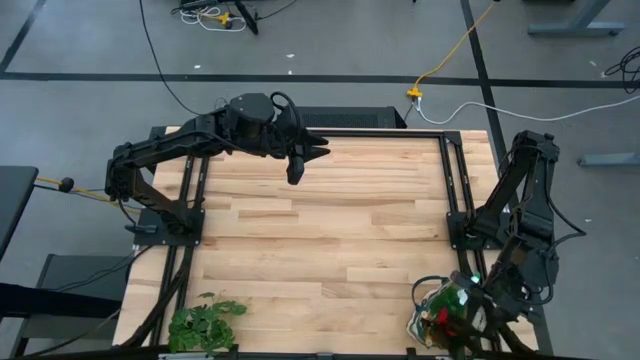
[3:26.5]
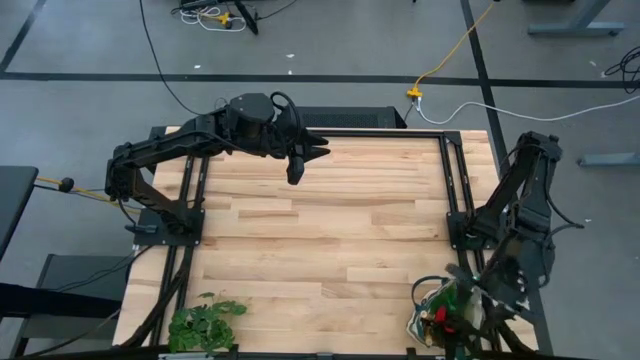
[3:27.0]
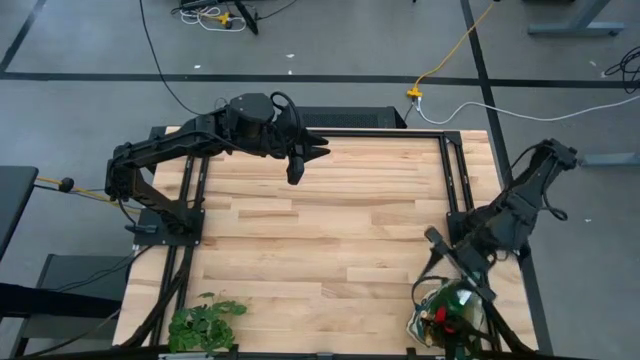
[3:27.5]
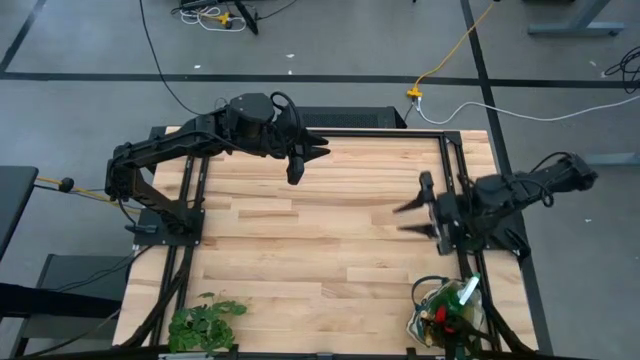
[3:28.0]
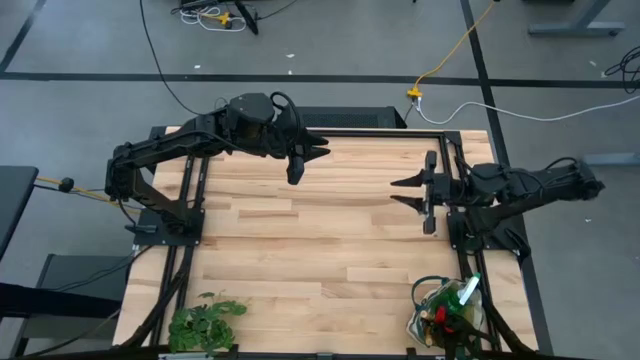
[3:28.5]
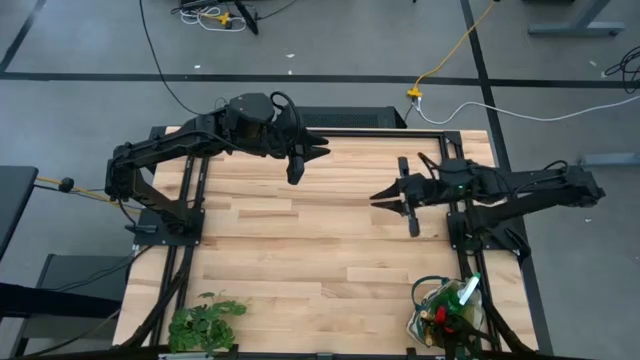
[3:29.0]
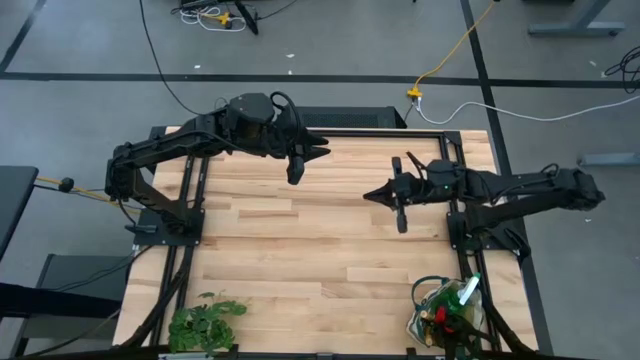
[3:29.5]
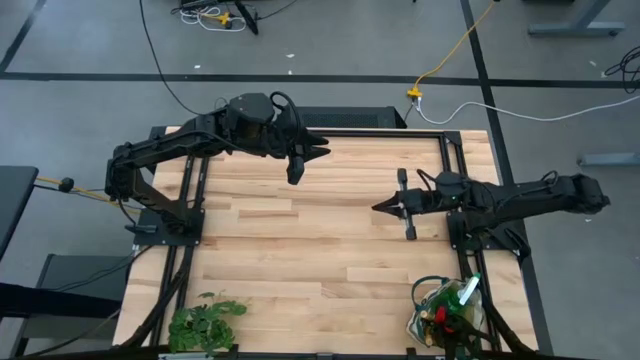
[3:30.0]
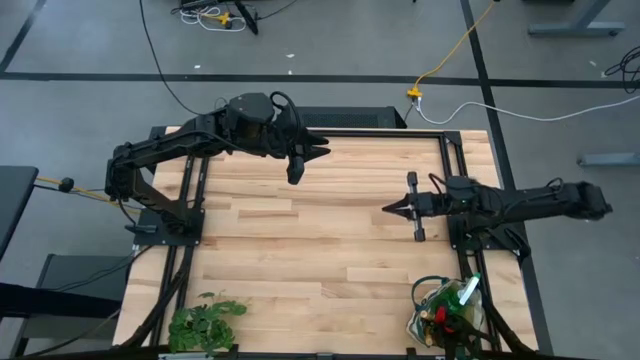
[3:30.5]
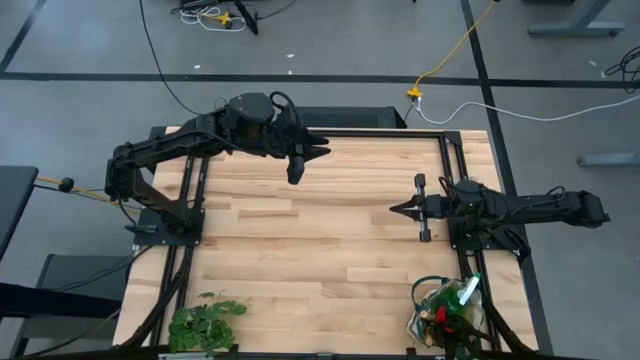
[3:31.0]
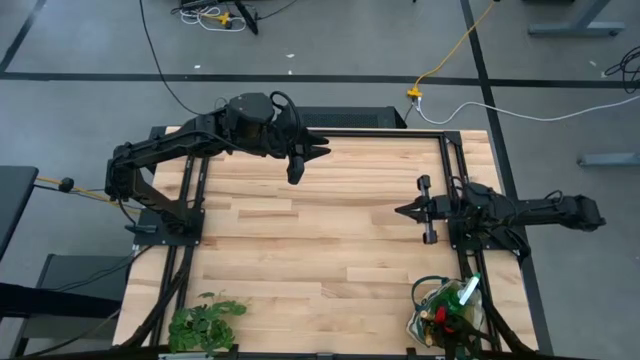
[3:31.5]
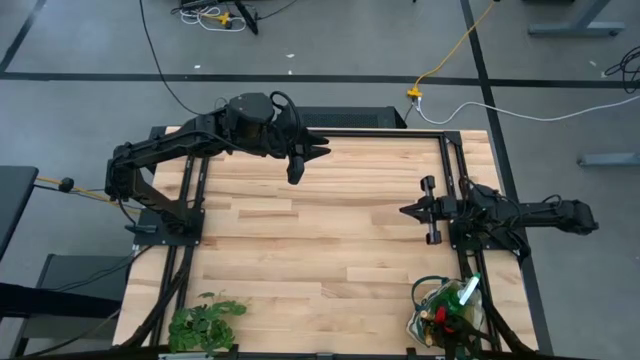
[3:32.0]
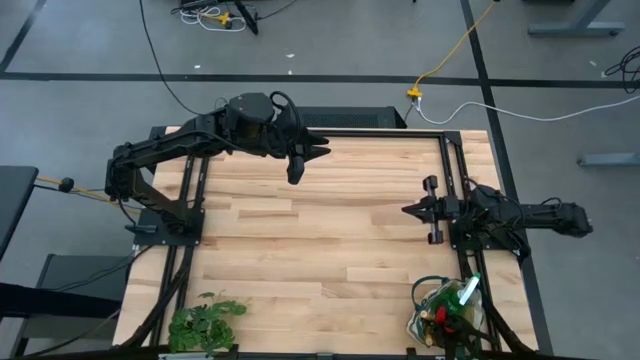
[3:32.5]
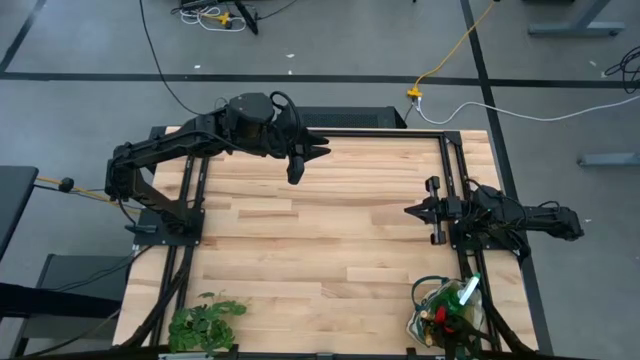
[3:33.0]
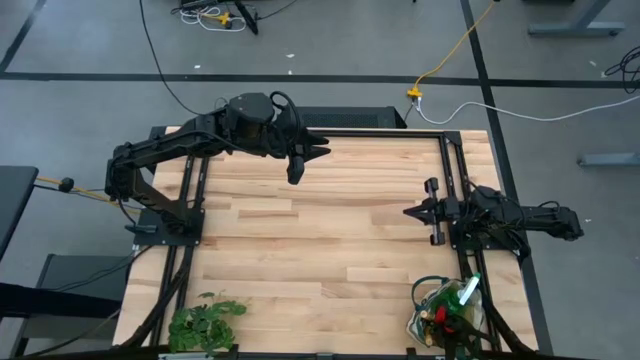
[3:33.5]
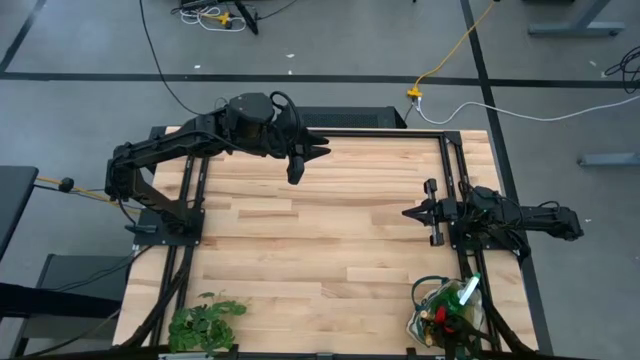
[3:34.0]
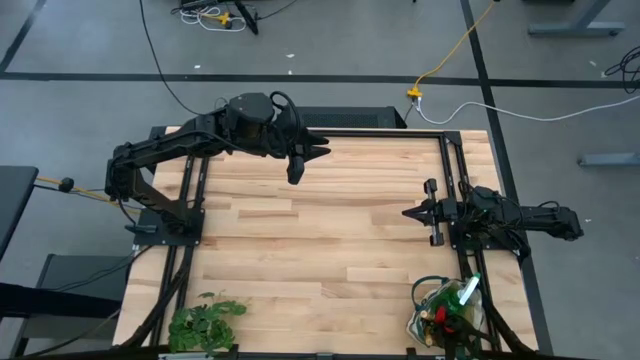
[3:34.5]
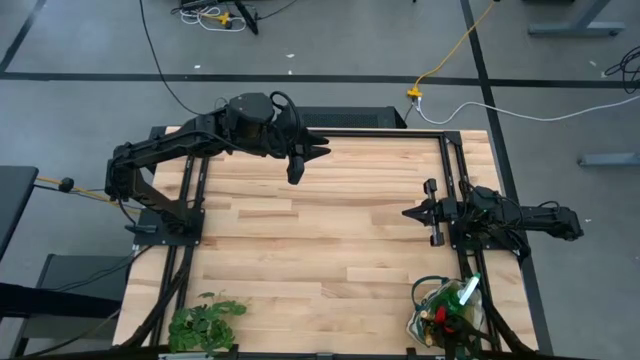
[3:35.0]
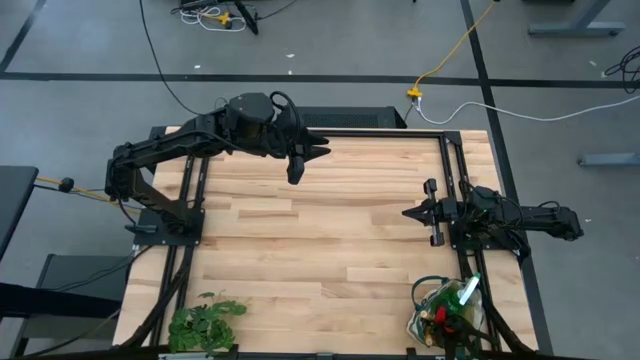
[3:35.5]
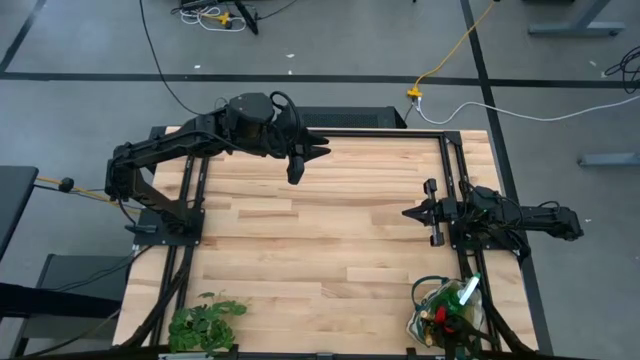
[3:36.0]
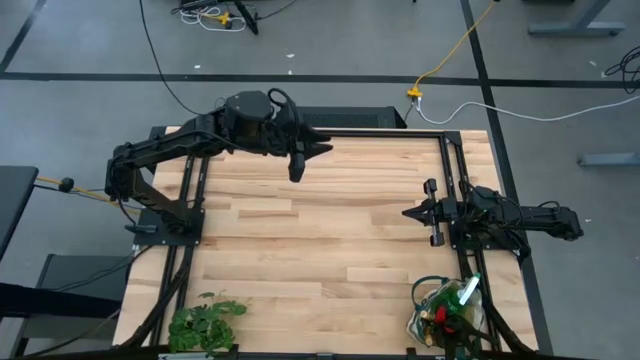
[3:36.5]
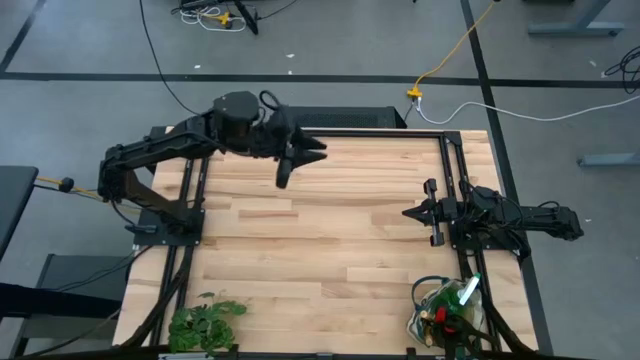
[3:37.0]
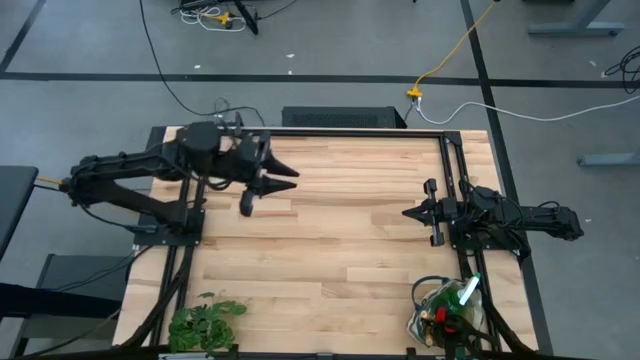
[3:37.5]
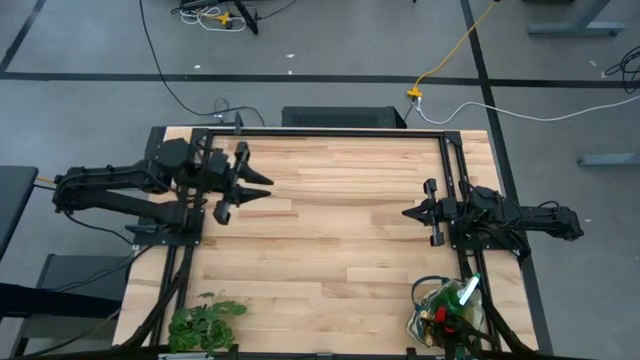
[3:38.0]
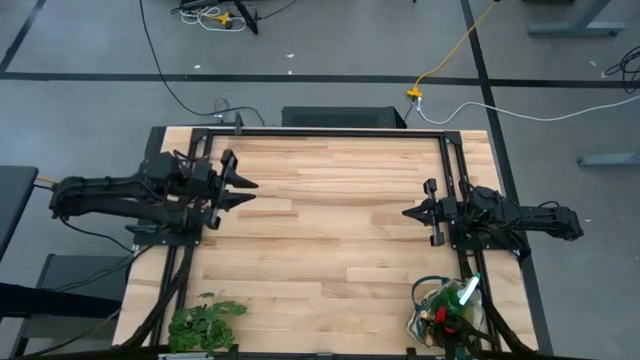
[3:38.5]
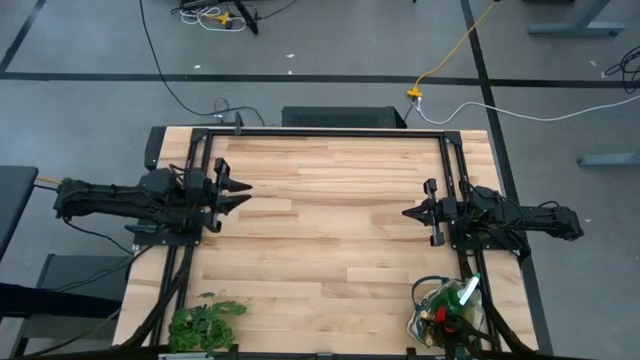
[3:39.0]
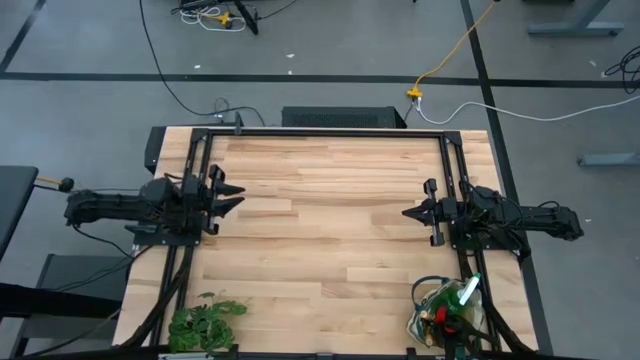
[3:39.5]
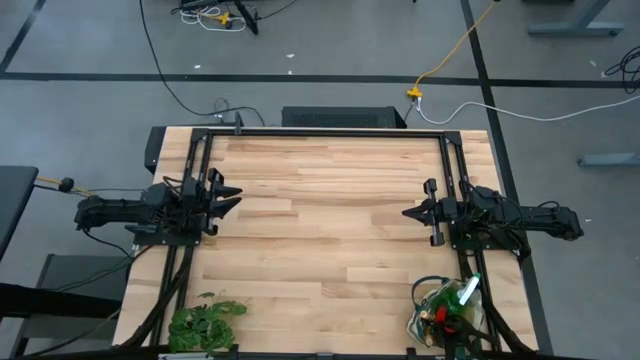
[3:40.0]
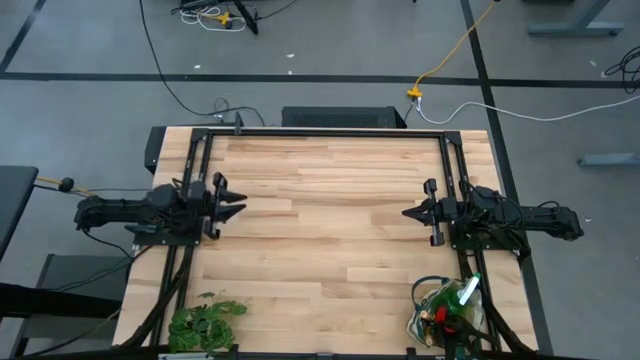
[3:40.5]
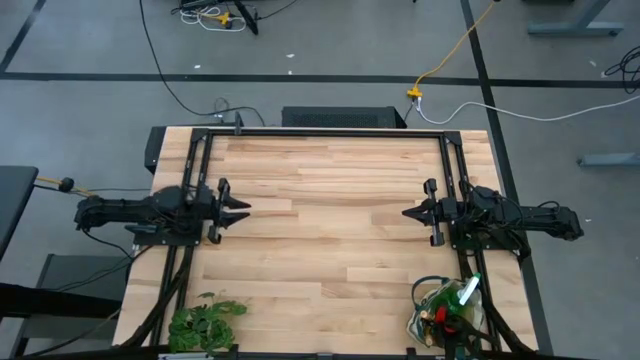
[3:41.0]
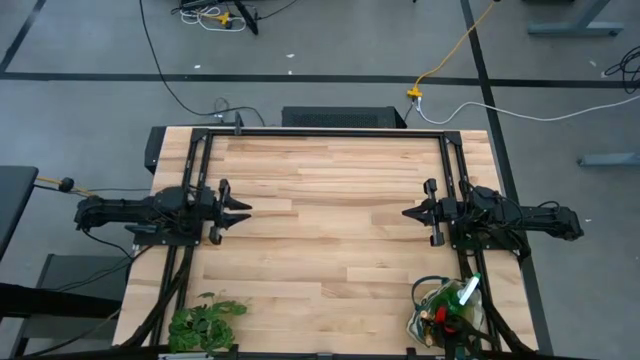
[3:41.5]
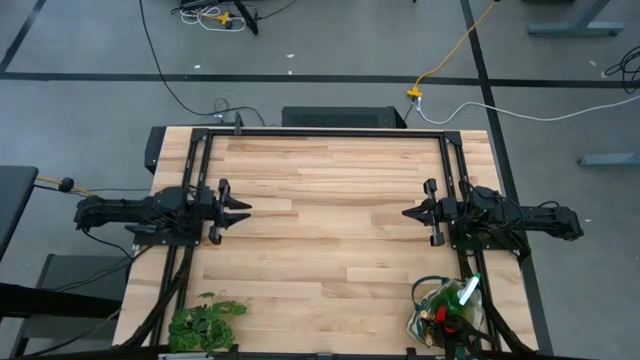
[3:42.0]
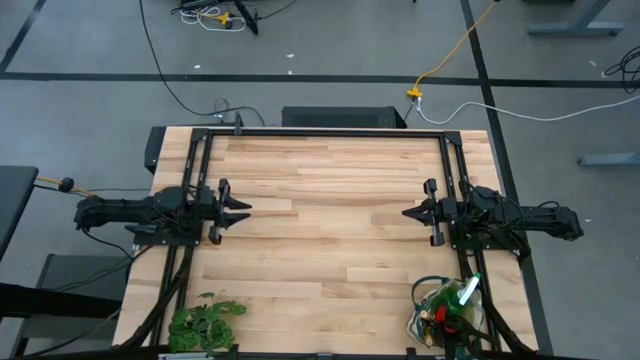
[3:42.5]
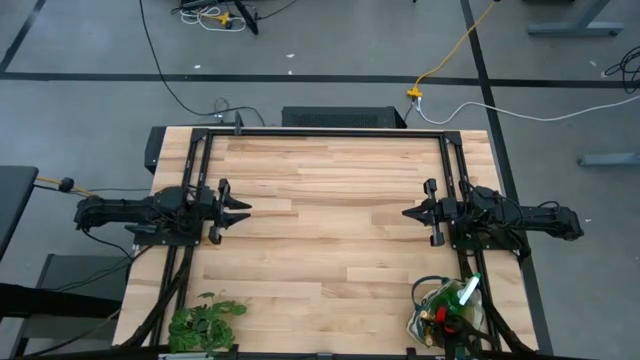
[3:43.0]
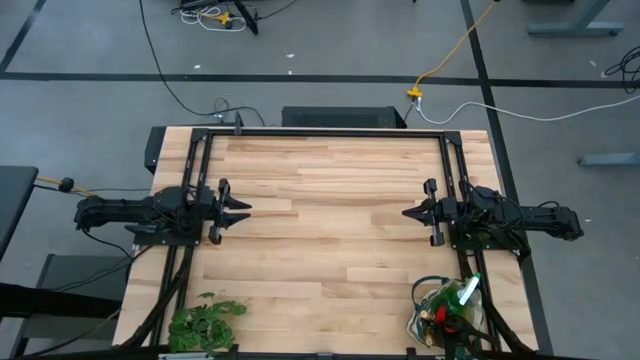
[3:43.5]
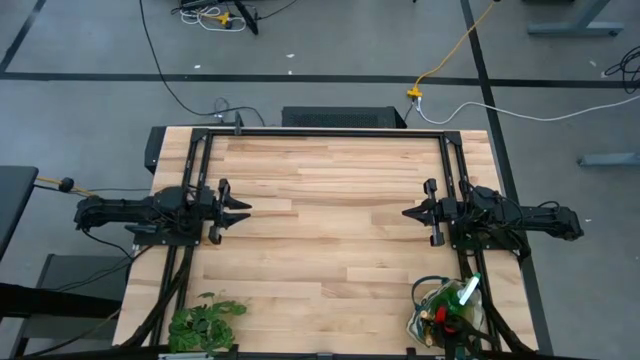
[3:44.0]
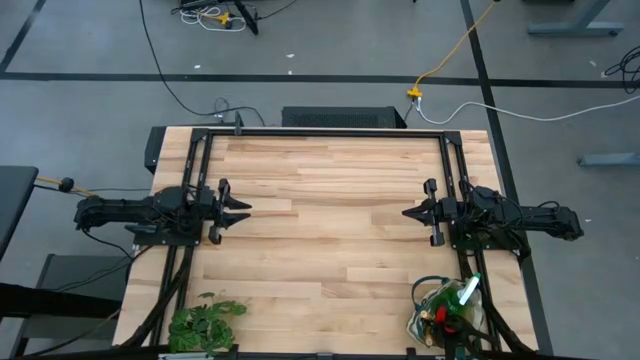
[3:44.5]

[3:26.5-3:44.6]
Task: Pick & Place Garden tools in Gardening bag
Return to Home Position

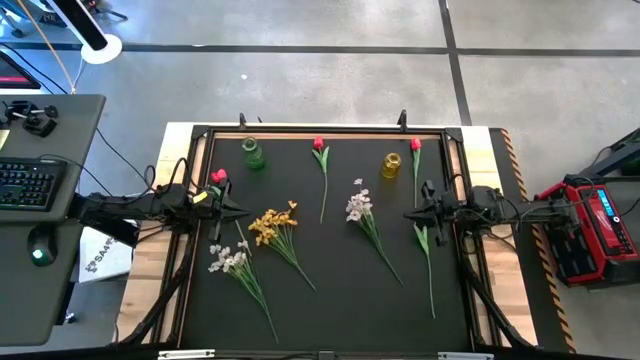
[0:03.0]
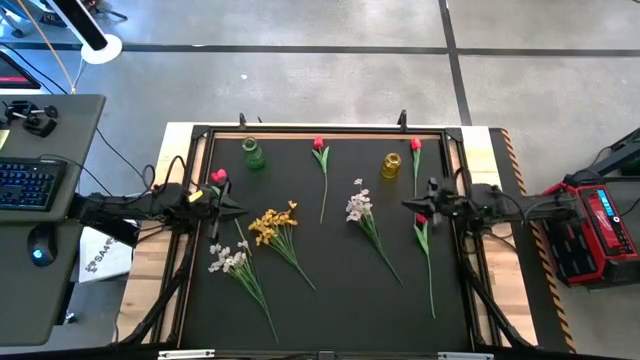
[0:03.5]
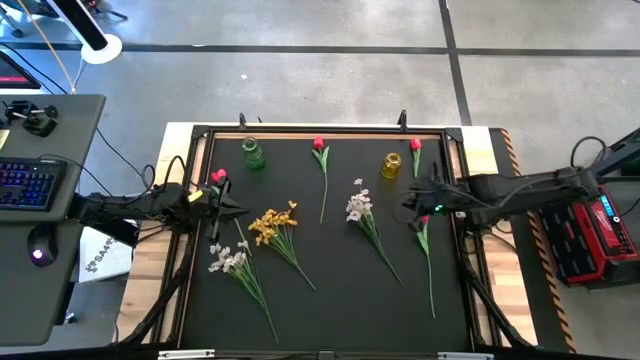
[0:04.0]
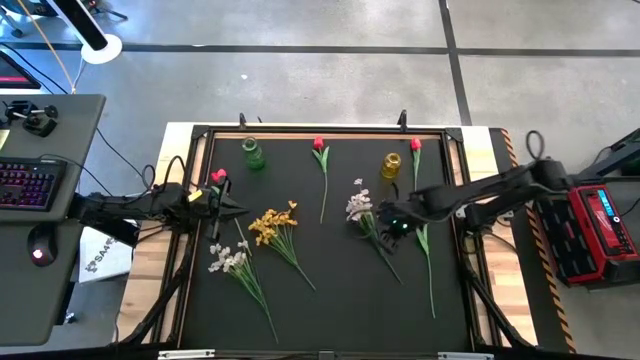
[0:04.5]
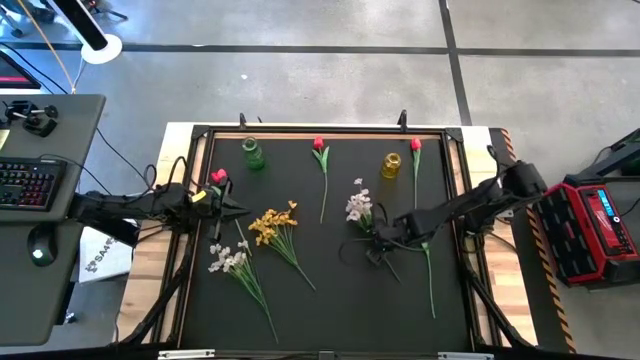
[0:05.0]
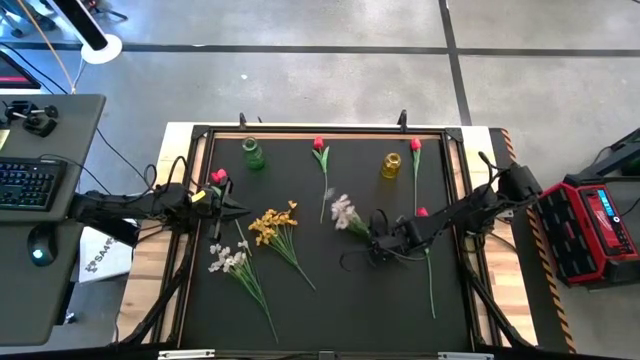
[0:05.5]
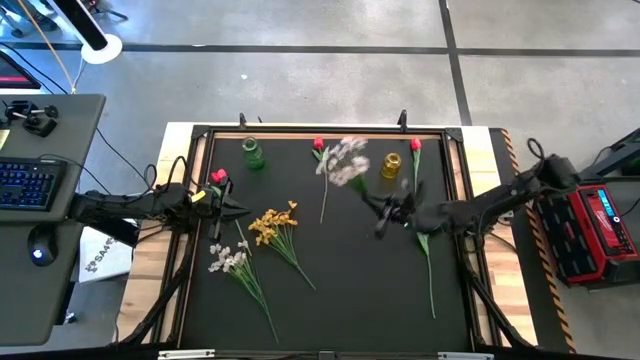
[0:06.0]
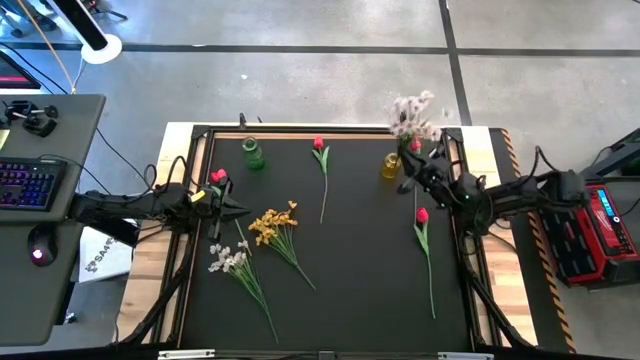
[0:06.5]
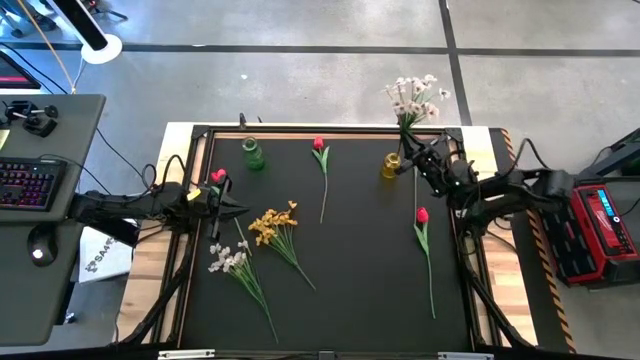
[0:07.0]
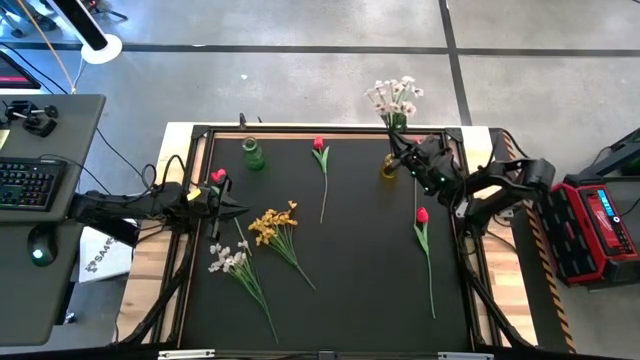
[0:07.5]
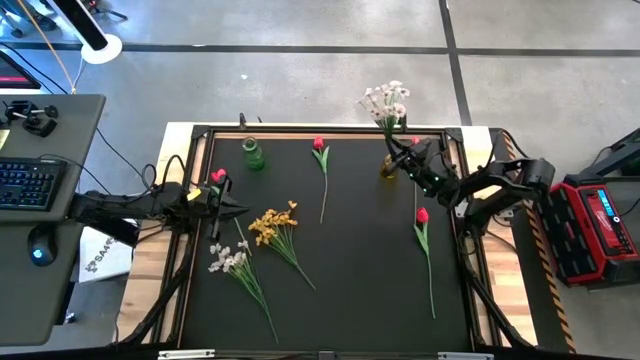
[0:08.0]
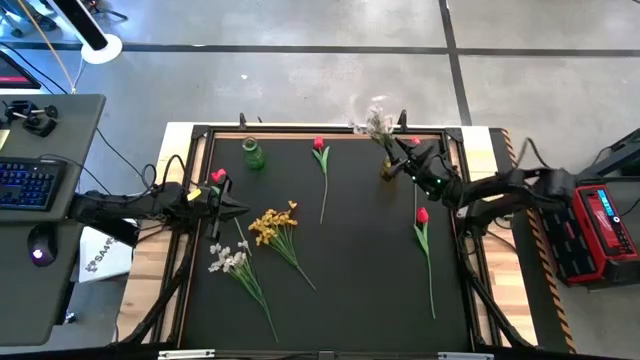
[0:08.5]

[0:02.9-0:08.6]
Task: Sort flowers into vase by color
Put the white tulip into the yellow flower vase
